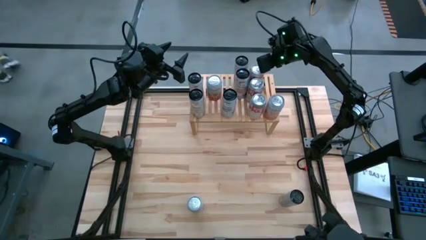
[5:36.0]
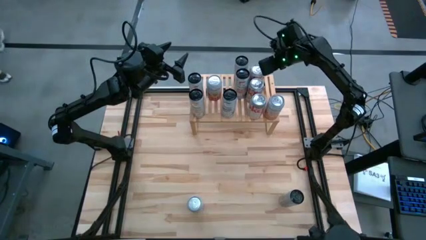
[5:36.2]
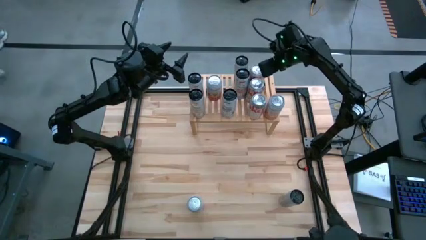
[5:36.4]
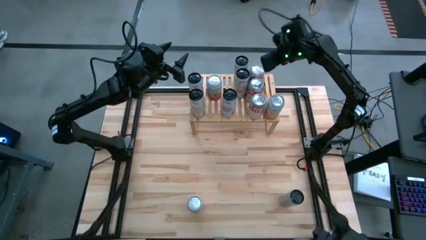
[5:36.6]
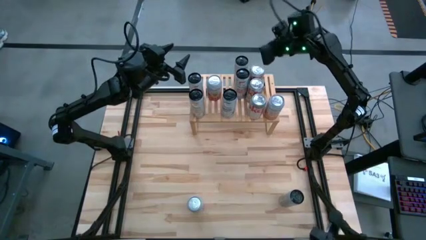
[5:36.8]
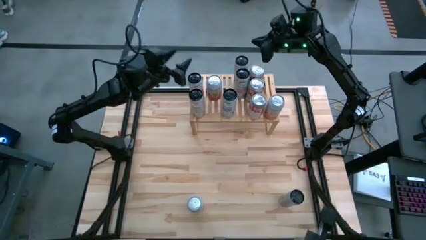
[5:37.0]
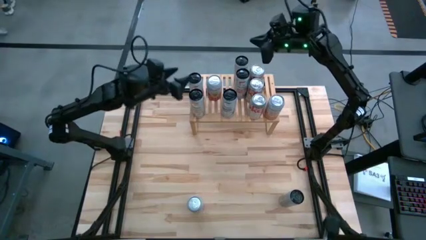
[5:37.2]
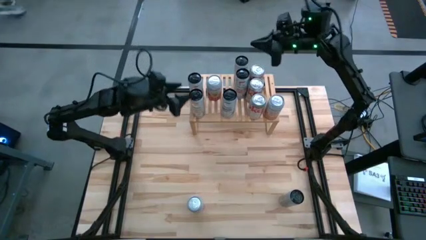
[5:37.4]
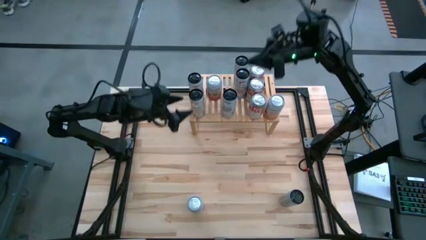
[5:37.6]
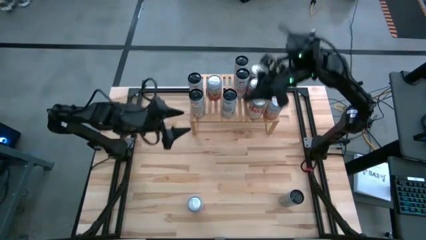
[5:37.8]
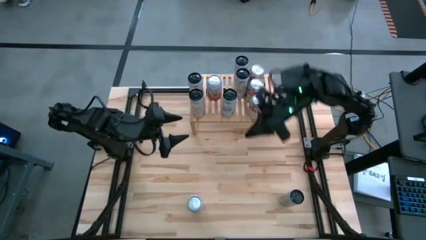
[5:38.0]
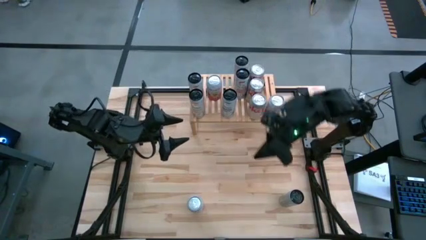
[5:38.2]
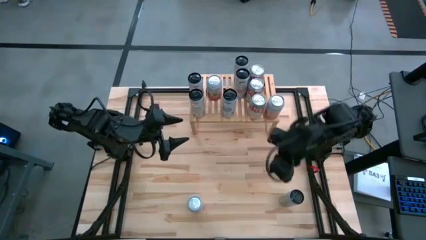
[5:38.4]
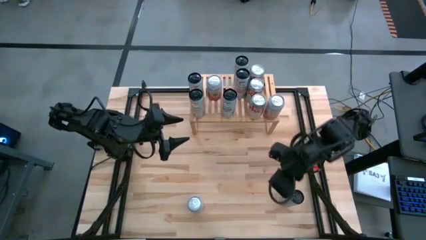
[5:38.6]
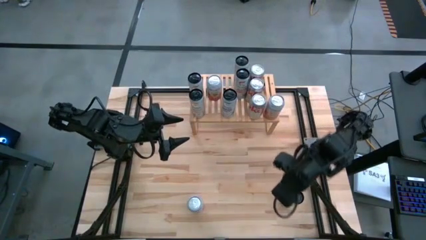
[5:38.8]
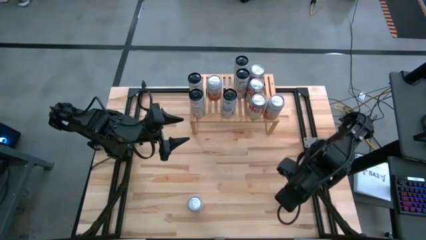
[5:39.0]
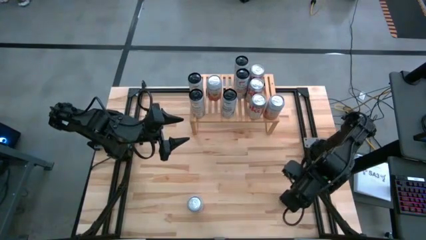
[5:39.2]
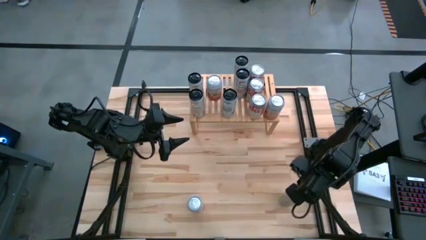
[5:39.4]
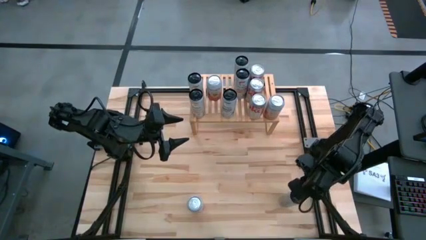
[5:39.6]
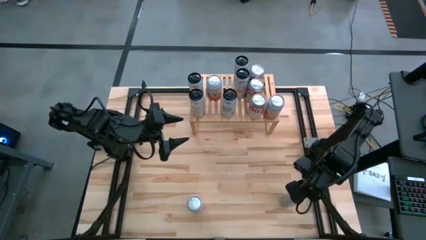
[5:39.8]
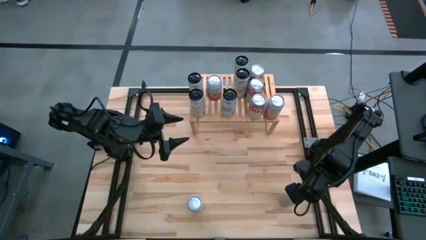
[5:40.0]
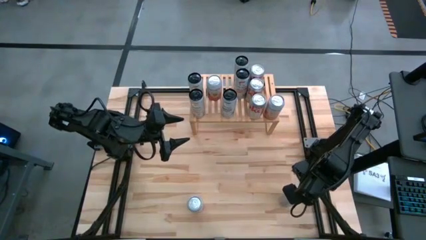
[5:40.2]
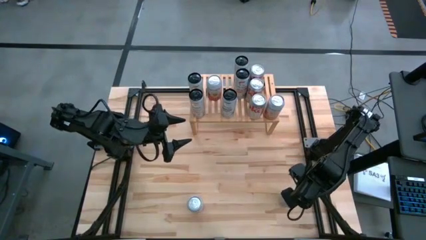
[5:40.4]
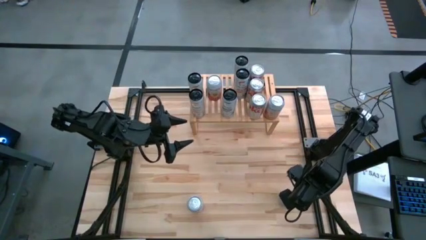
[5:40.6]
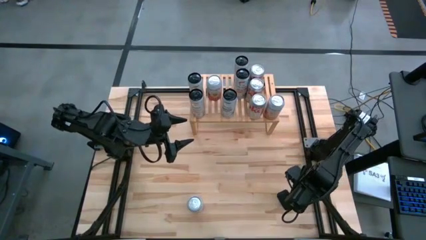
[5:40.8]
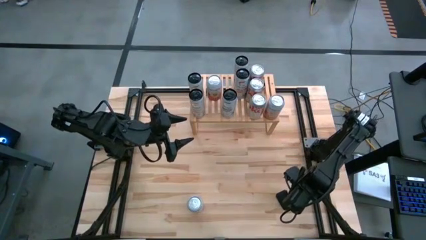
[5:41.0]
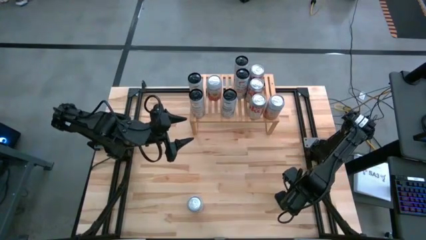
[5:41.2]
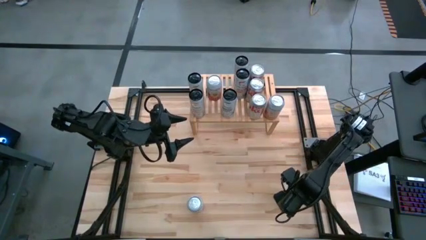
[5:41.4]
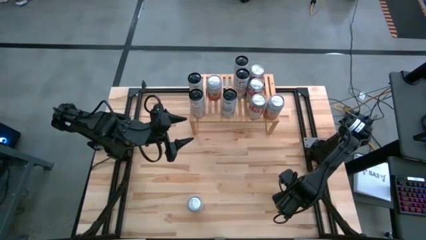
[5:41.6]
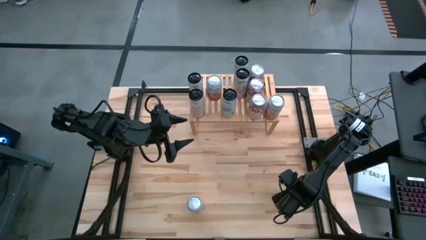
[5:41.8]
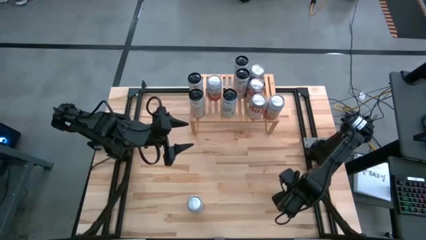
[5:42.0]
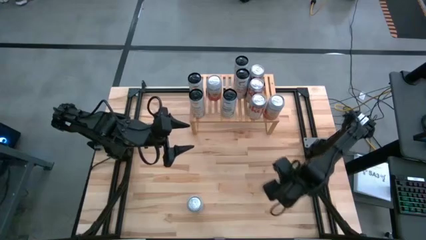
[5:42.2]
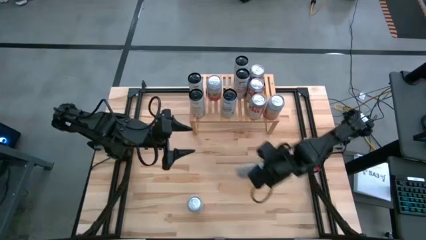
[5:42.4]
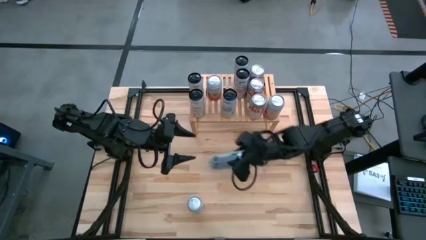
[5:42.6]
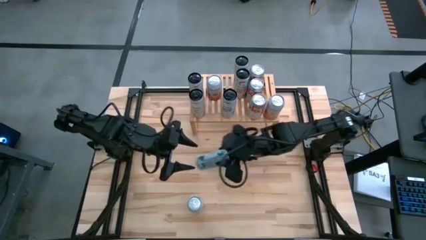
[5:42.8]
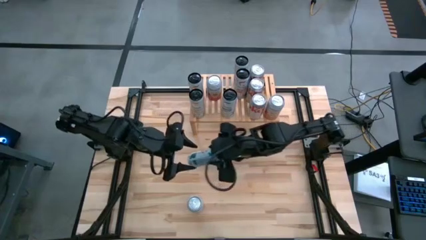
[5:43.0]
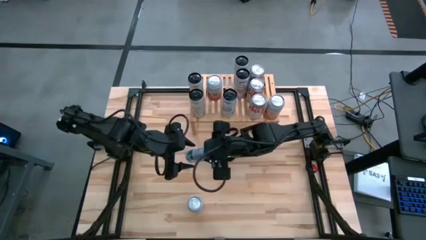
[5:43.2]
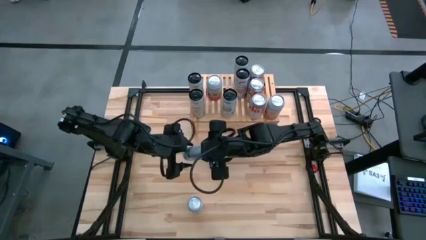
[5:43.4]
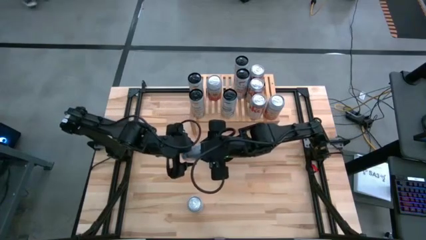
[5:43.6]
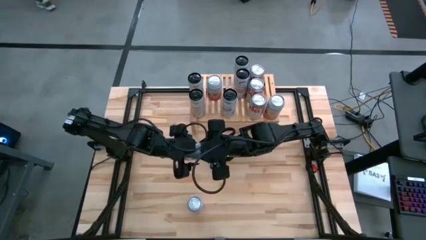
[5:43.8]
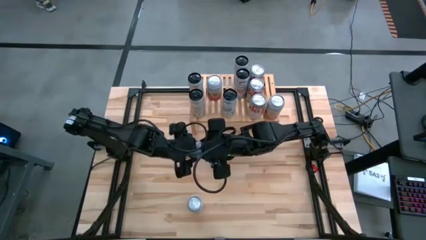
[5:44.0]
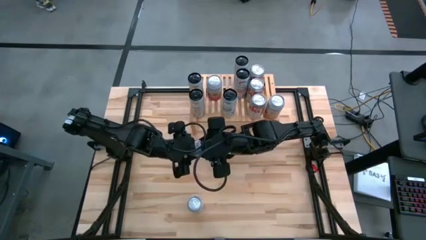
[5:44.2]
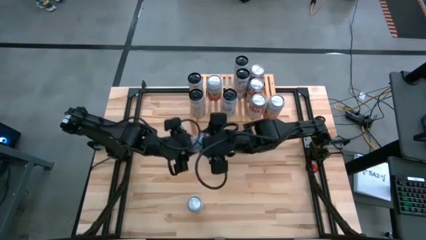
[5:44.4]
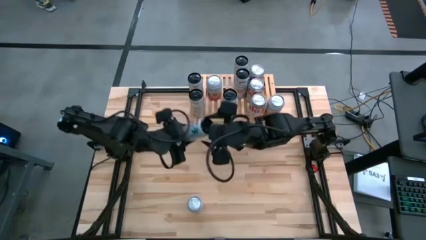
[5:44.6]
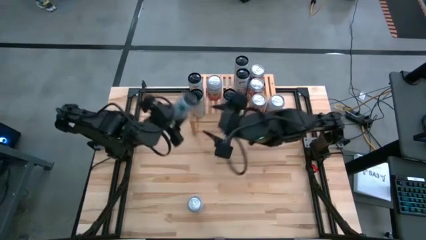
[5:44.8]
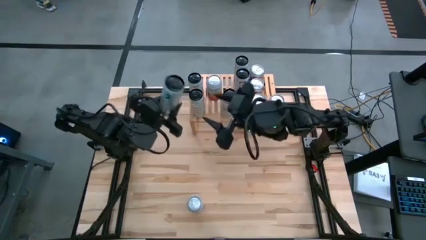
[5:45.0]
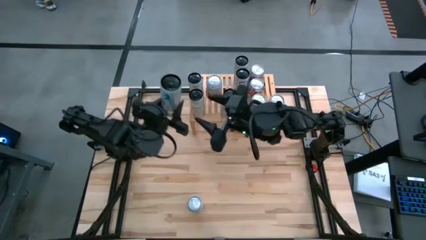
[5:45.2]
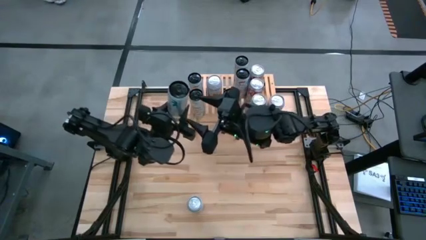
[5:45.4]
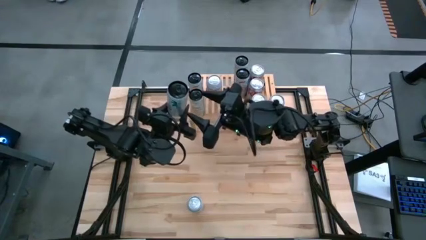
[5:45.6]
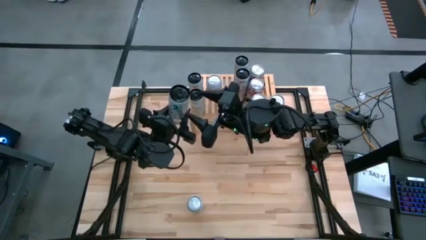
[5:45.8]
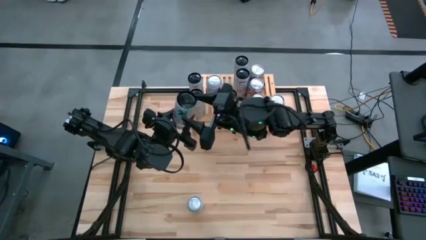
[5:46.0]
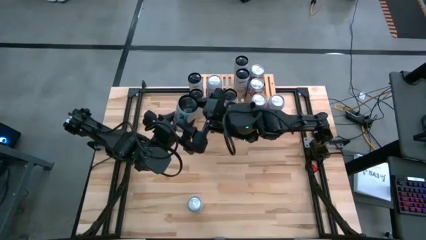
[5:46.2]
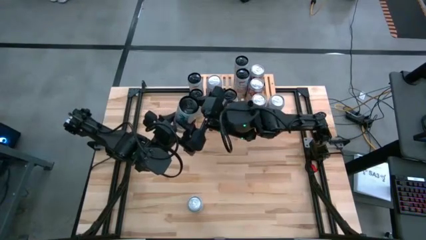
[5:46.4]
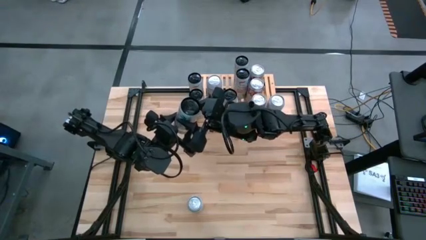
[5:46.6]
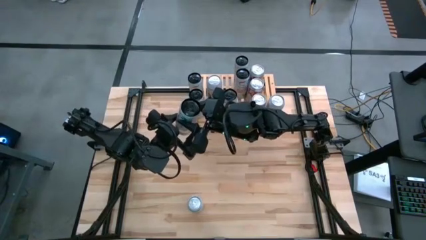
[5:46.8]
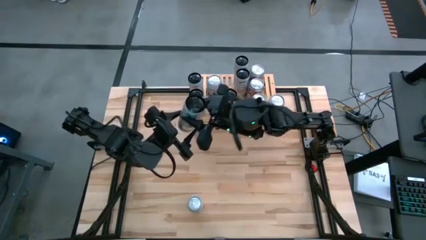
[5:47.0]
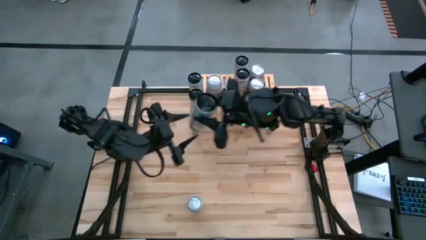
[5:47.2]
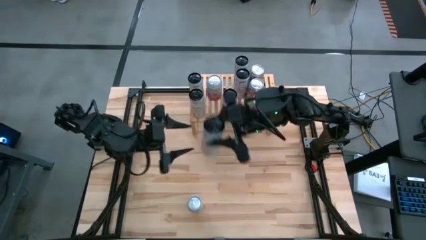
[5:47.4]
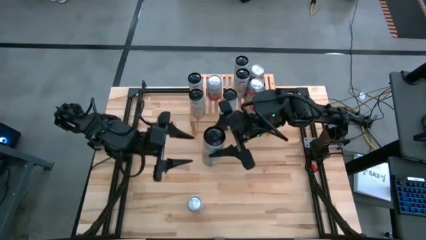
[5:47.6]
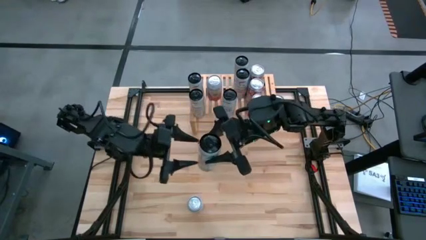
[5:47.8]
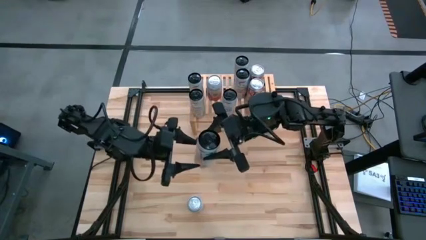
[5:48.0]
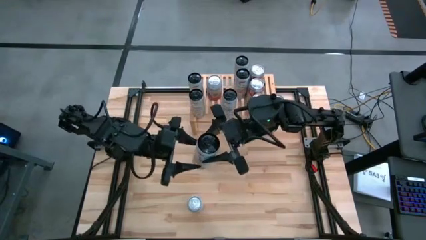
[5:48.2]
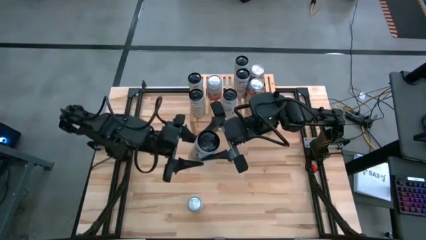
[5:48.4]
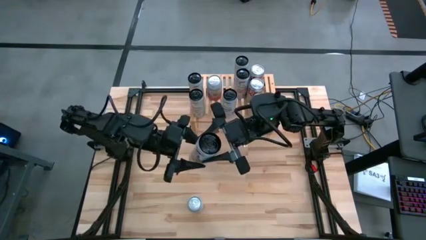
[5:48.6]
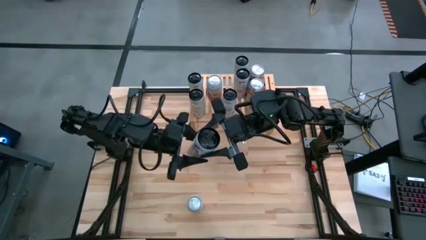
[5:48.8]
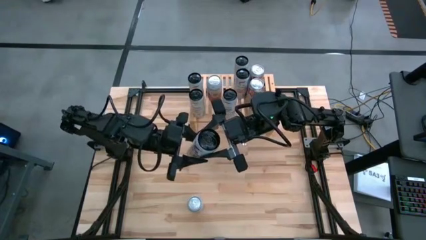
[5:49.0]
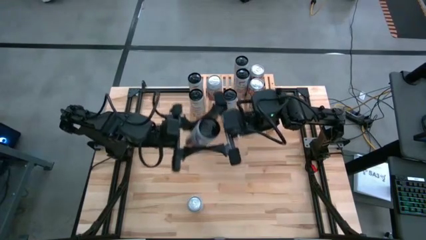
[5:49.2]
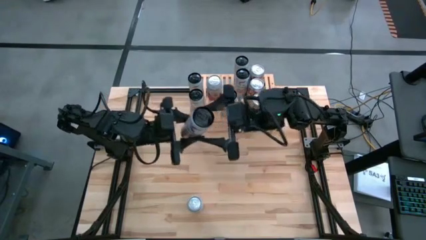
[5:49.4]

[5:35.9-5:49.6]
Task: Place canned beverage on shelf
Put the white soda can on the shelf aligned with the other white soda cans

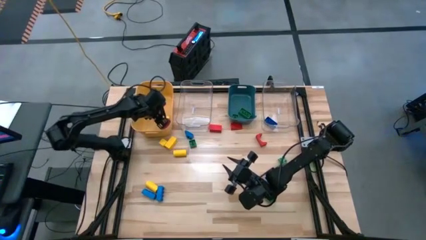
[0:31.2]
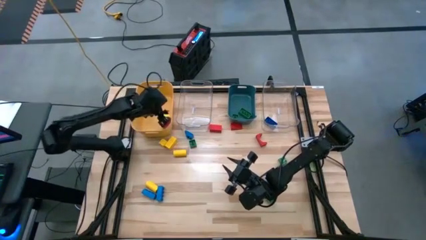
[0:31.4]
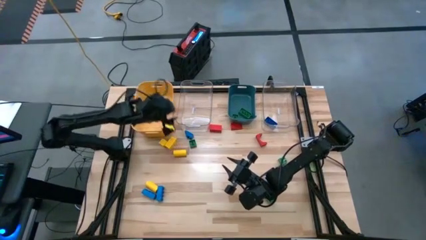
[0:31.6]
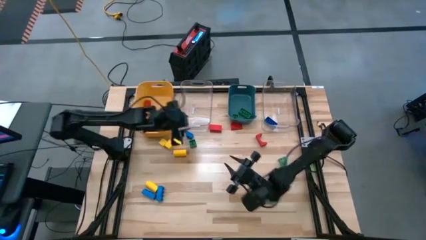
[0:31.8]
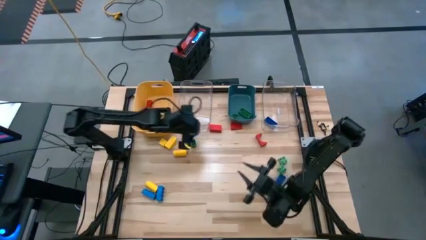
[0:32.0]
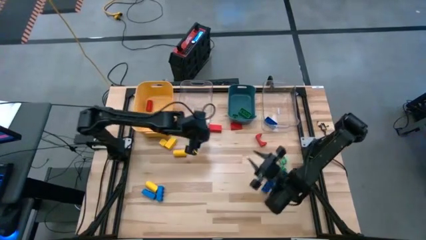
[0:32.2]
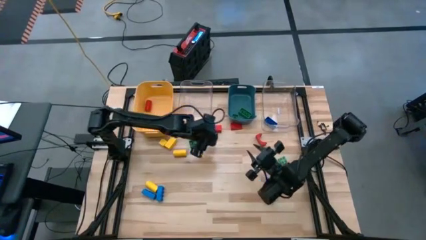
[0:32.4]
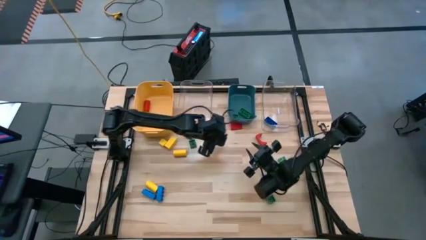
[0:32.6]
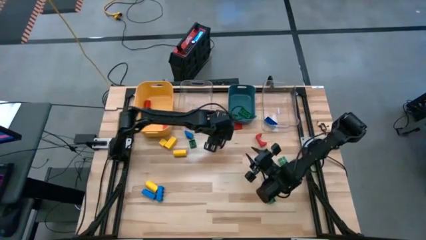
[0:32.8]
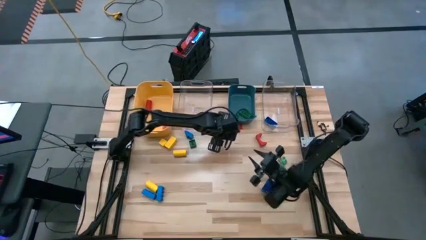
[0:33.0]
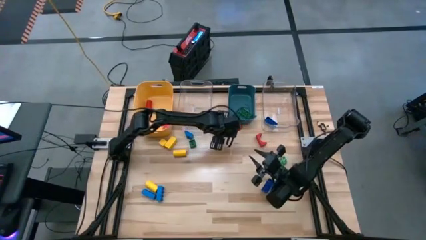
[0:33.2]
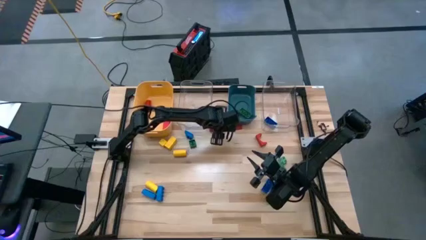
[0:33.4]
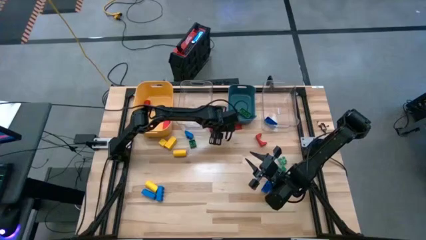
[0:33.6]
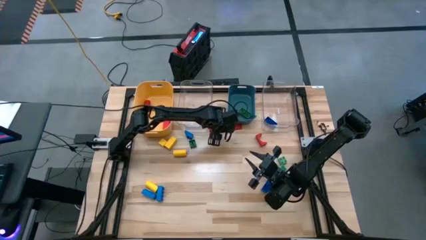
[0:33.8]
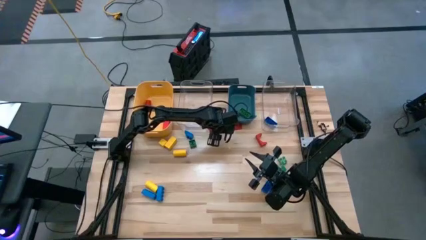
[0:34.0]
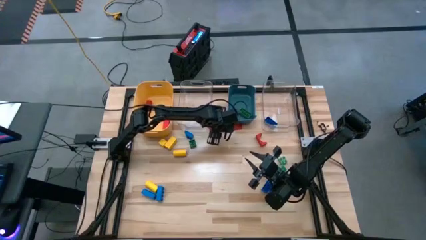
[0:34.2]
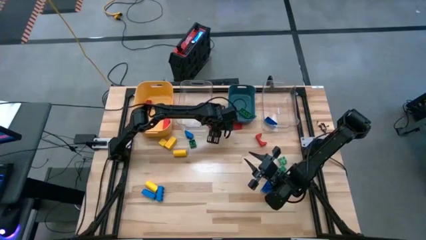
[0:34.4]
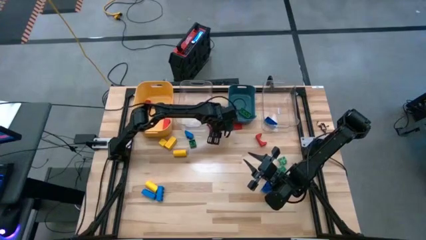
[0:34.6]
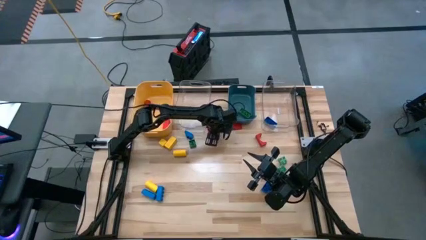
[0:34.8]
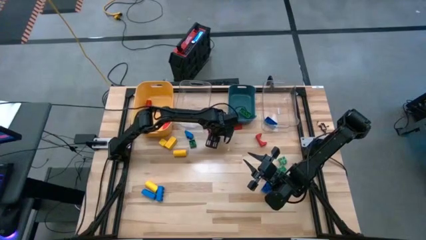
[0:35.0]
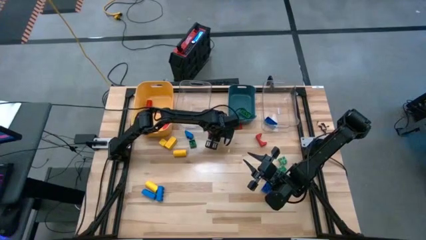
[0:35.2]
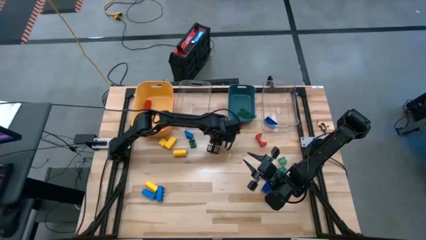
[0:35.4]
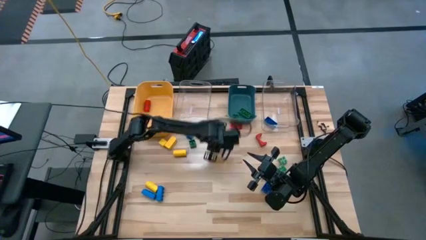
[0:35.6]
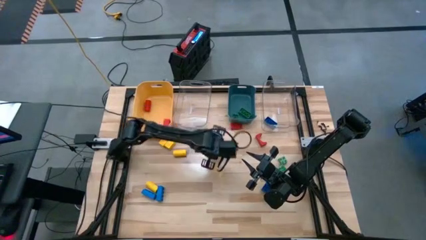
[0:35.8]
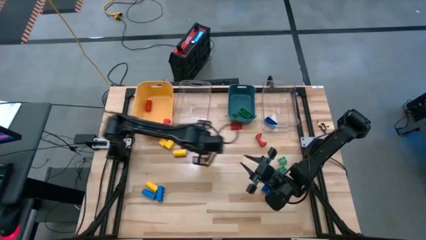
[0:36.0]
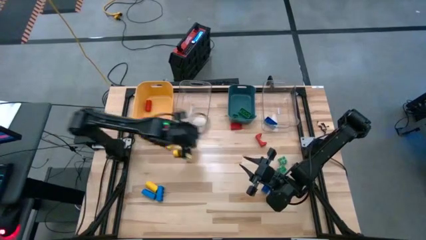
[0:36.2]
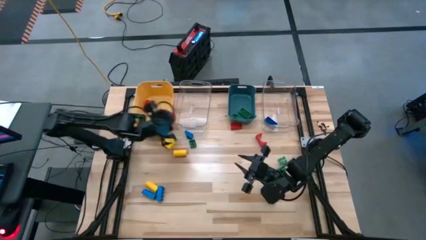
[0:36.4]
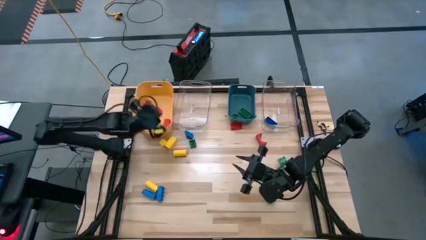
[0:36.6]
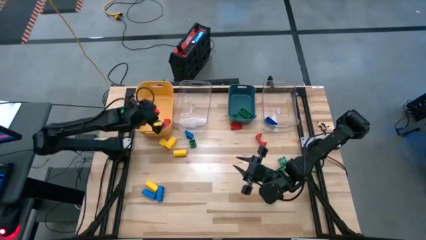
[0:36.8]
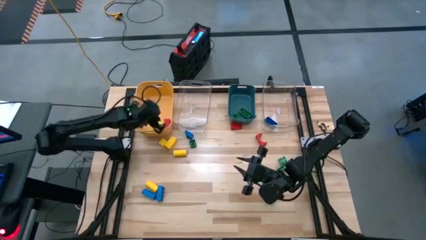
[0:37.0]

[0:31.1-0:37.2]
Task: Sort blocks
Put the red block into the yellow bin
